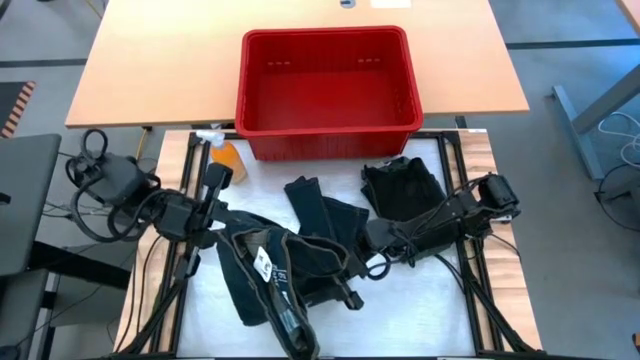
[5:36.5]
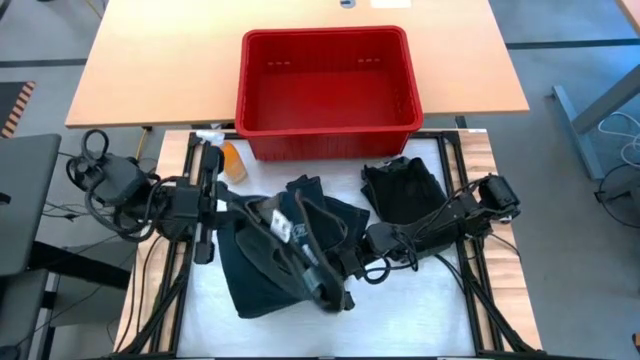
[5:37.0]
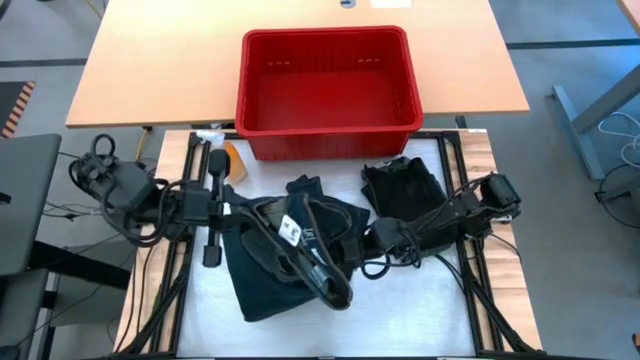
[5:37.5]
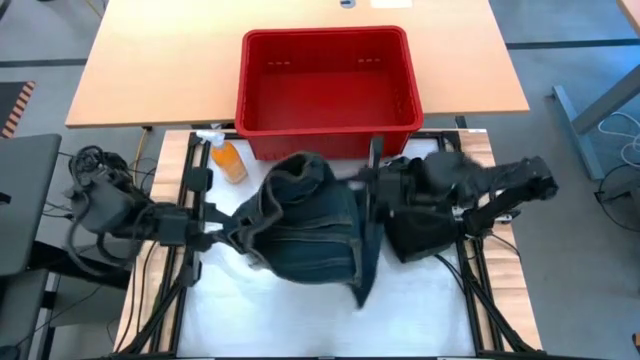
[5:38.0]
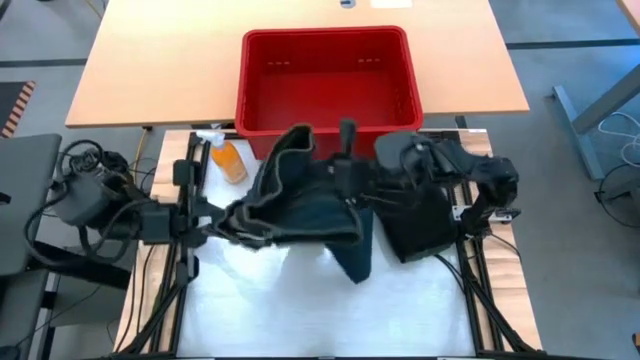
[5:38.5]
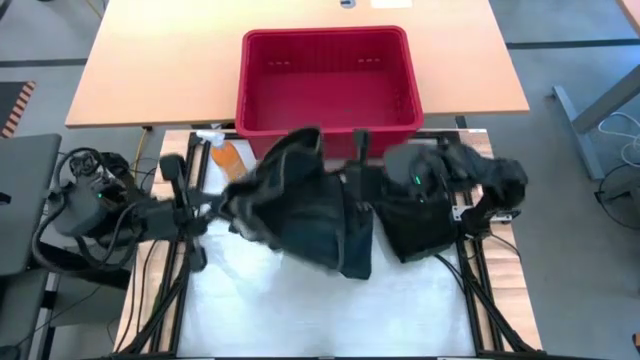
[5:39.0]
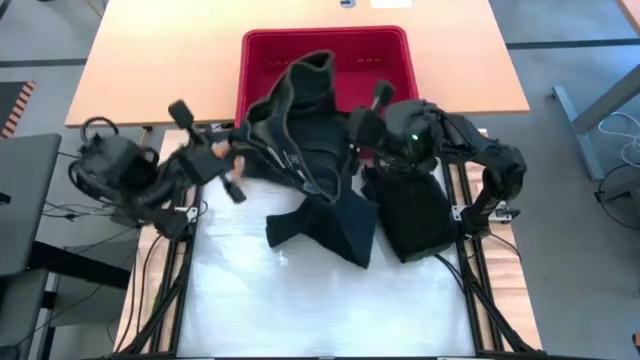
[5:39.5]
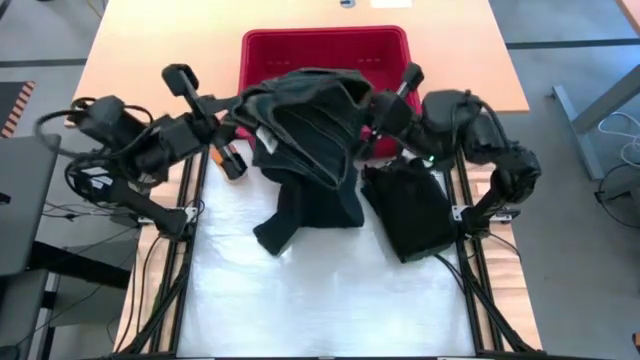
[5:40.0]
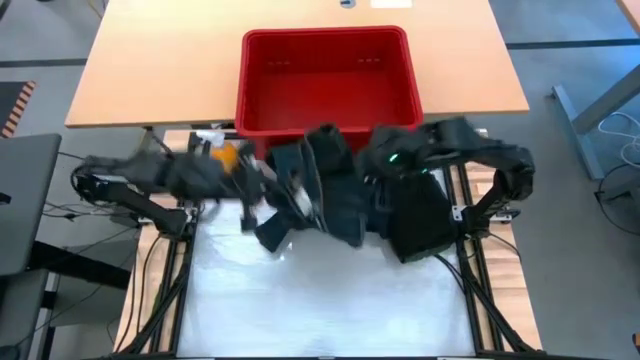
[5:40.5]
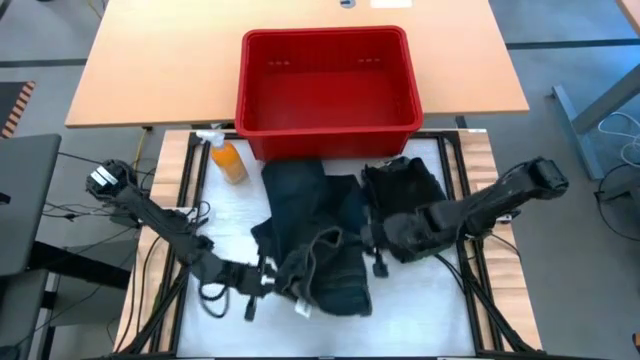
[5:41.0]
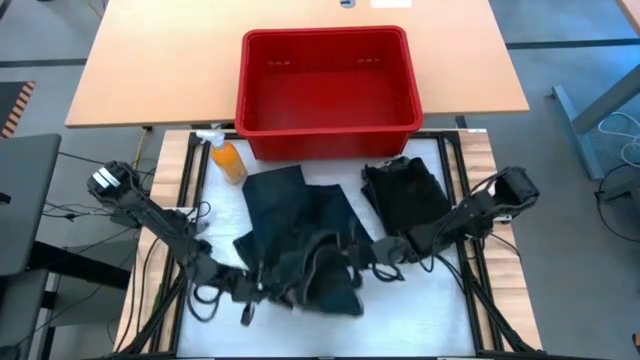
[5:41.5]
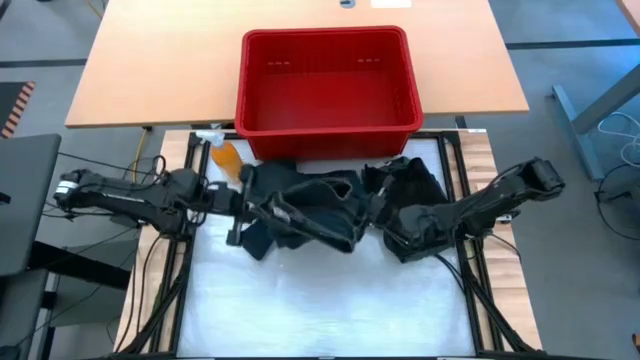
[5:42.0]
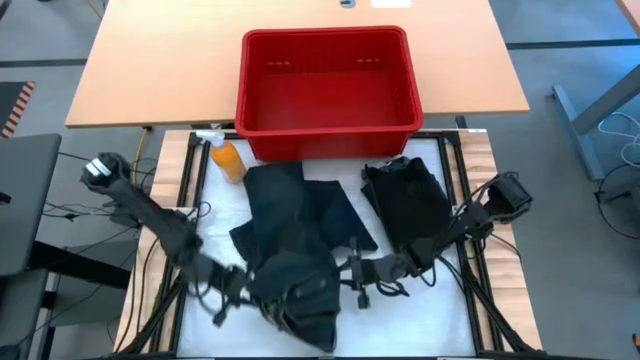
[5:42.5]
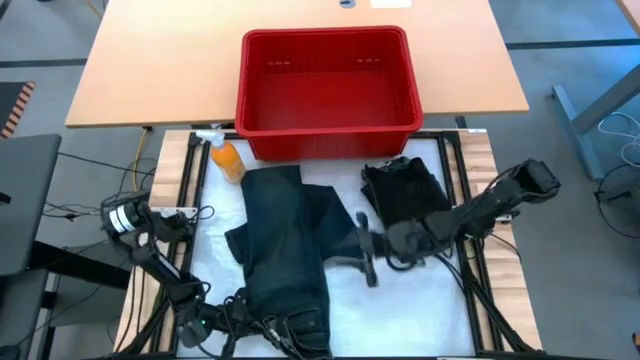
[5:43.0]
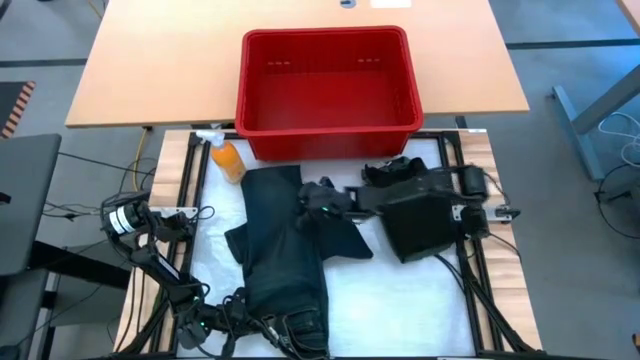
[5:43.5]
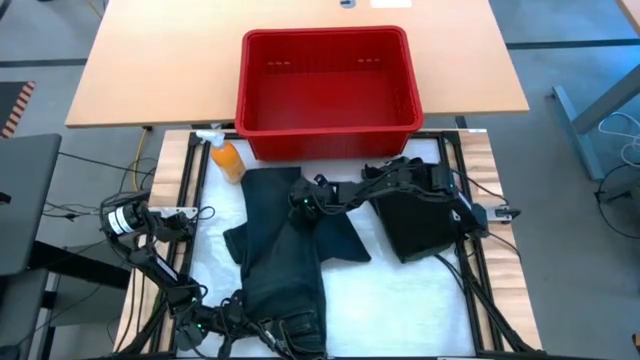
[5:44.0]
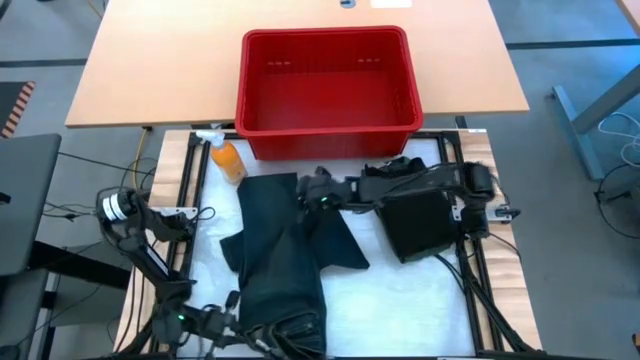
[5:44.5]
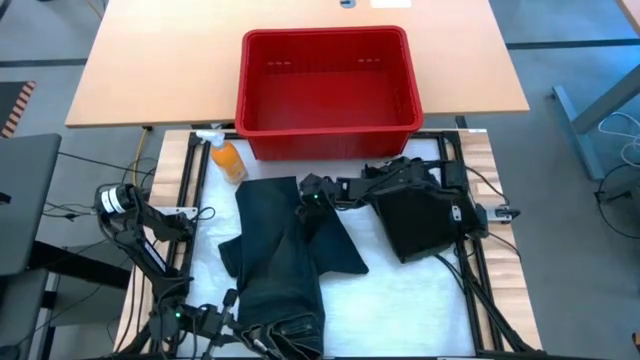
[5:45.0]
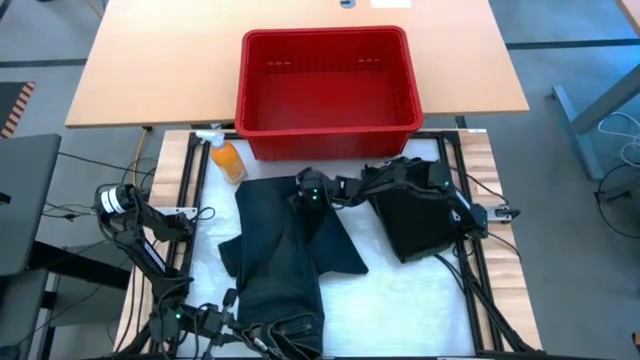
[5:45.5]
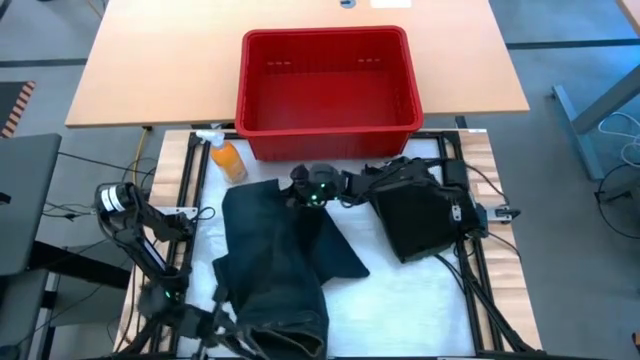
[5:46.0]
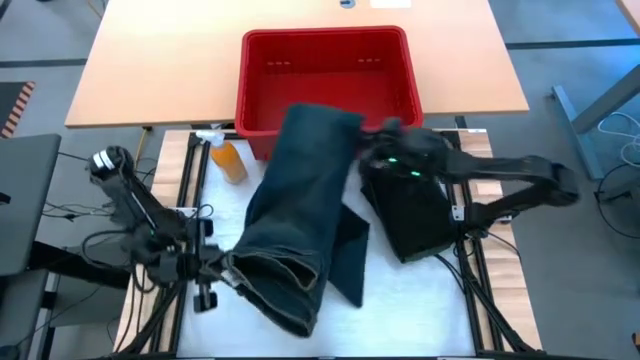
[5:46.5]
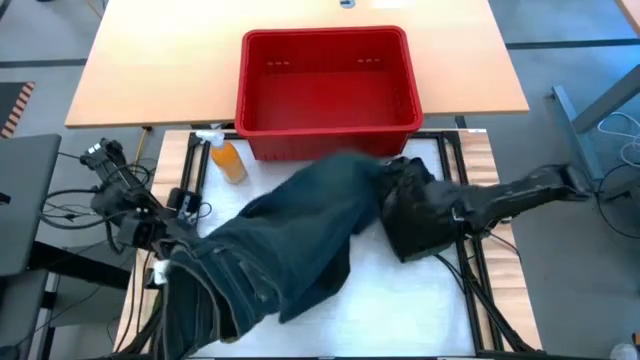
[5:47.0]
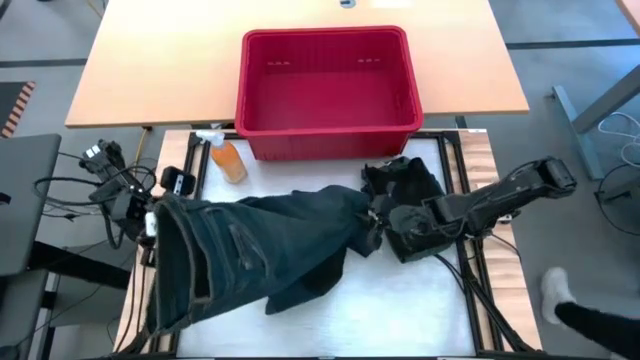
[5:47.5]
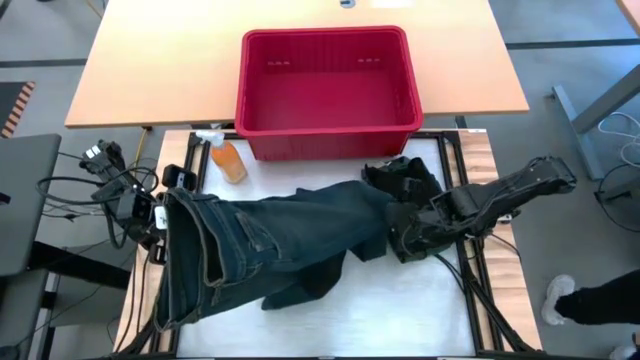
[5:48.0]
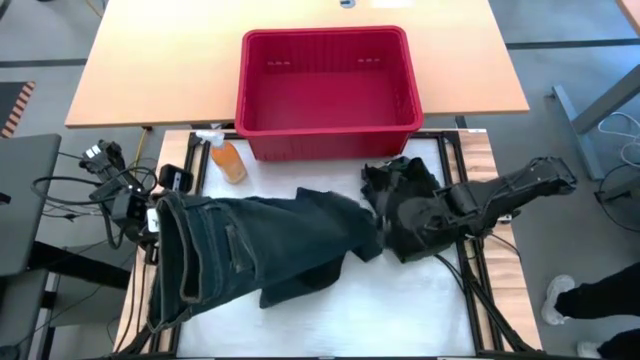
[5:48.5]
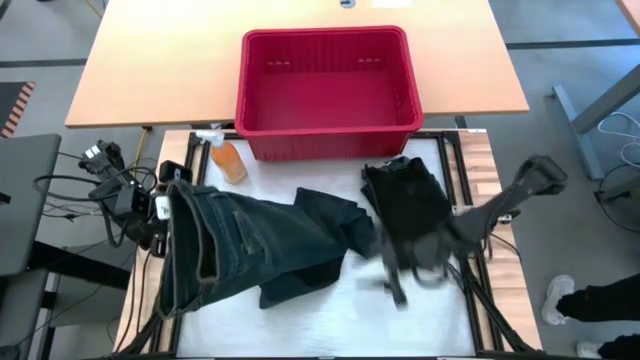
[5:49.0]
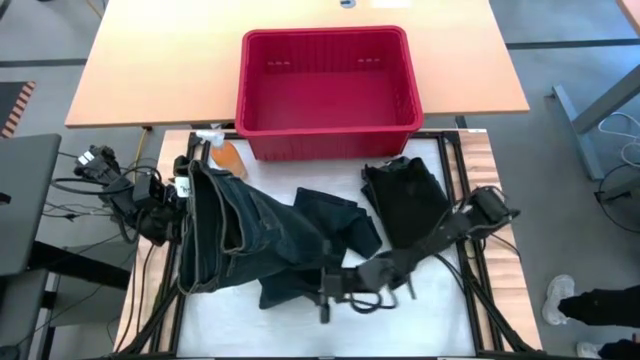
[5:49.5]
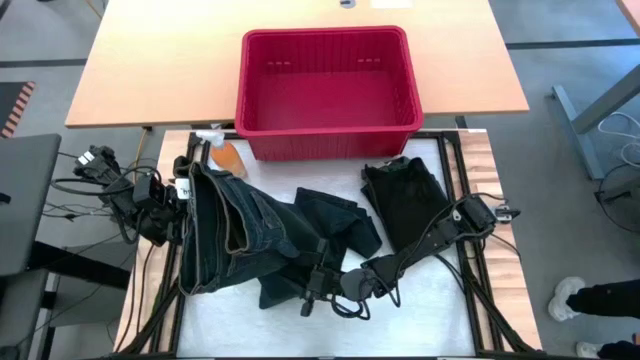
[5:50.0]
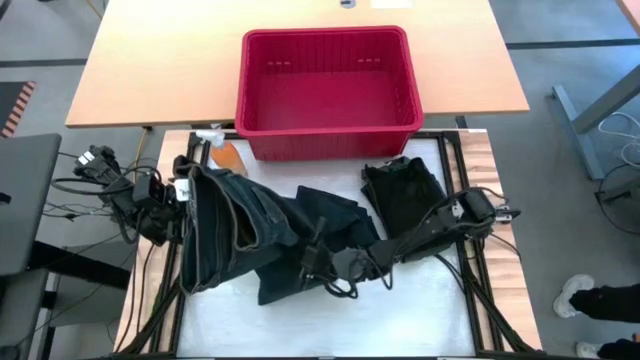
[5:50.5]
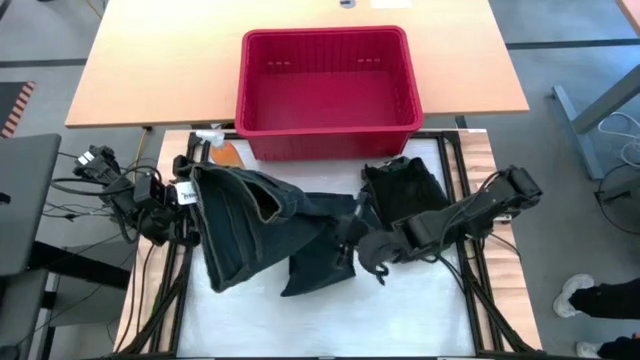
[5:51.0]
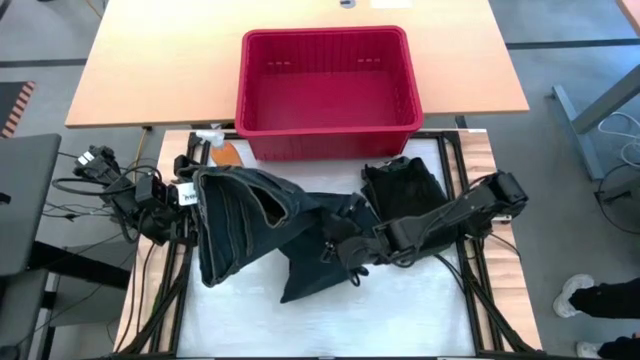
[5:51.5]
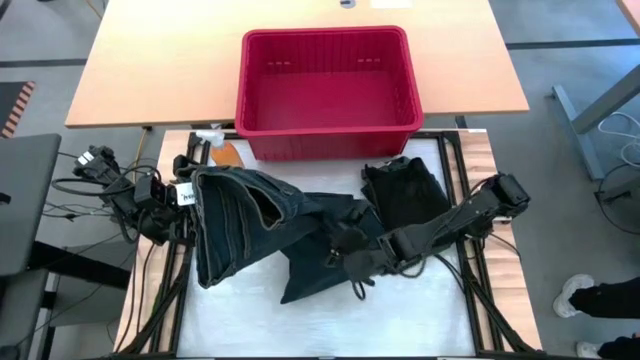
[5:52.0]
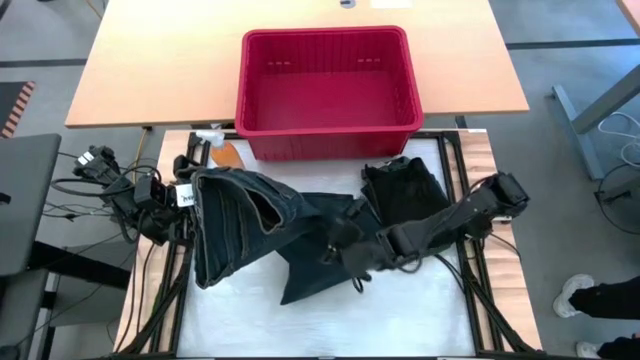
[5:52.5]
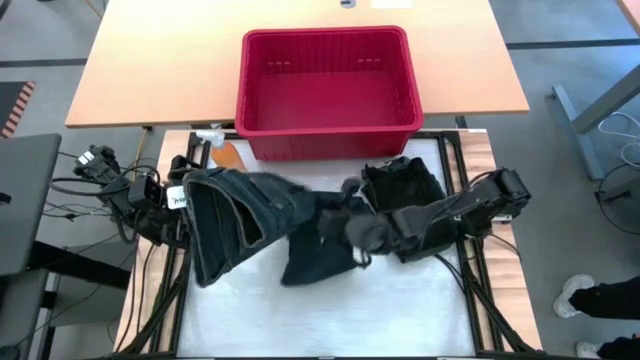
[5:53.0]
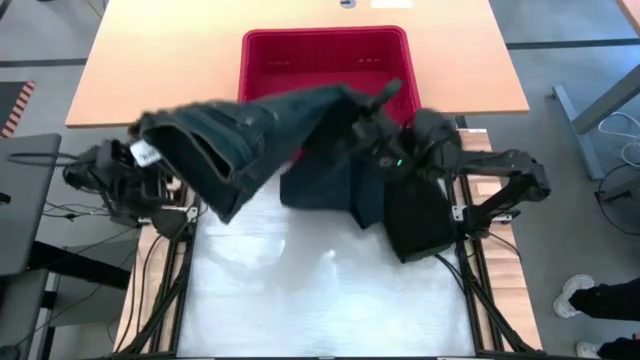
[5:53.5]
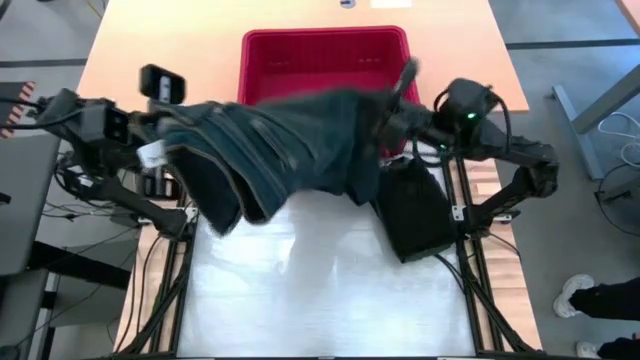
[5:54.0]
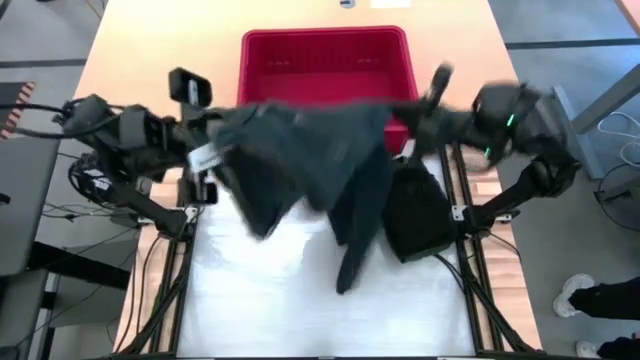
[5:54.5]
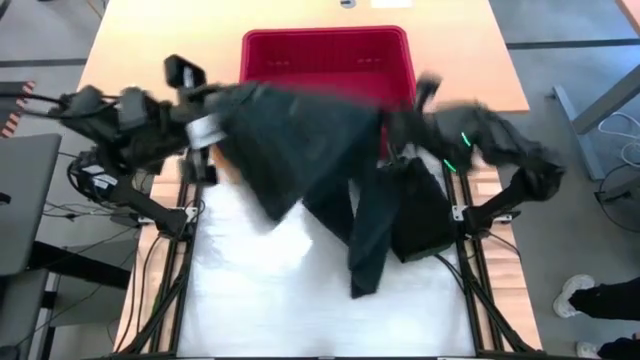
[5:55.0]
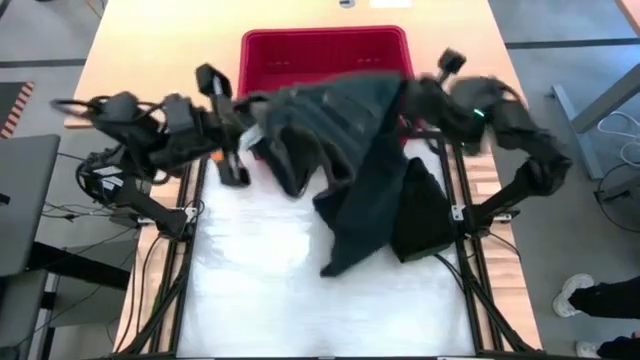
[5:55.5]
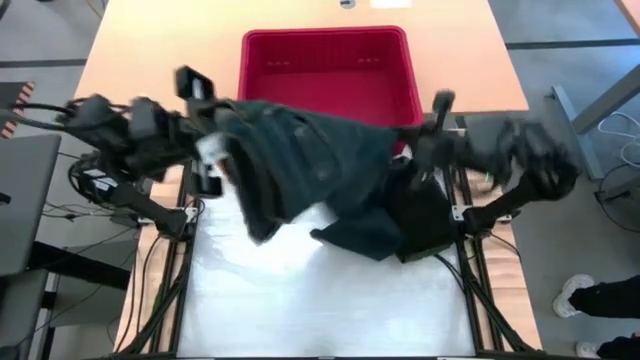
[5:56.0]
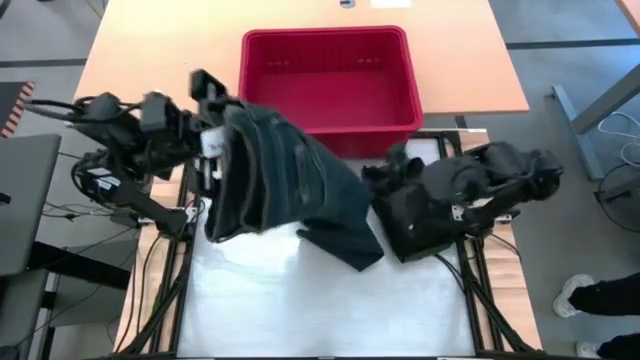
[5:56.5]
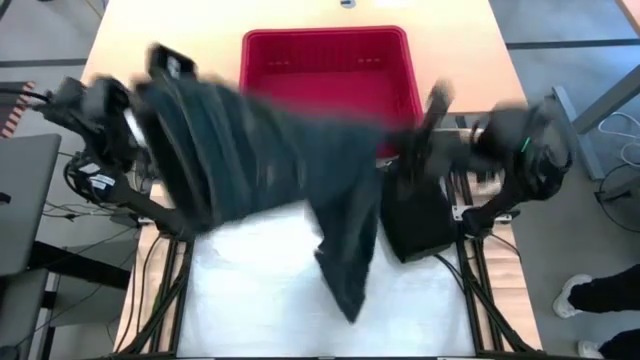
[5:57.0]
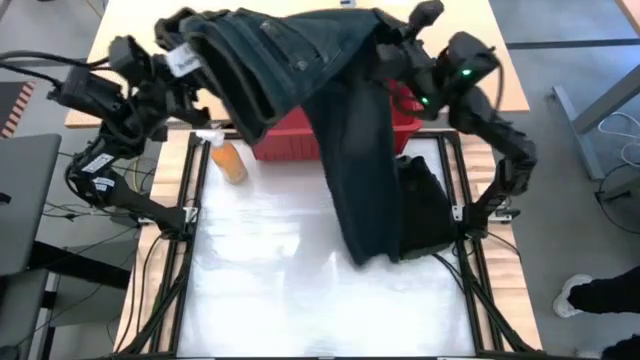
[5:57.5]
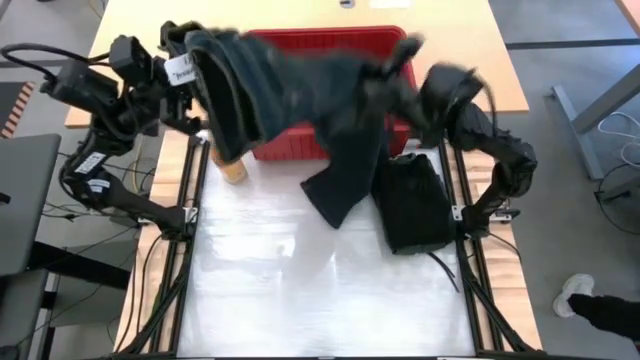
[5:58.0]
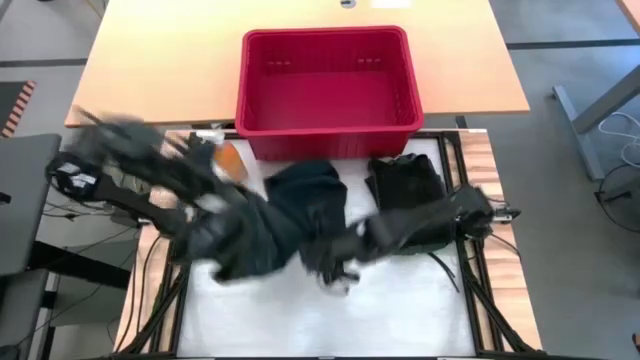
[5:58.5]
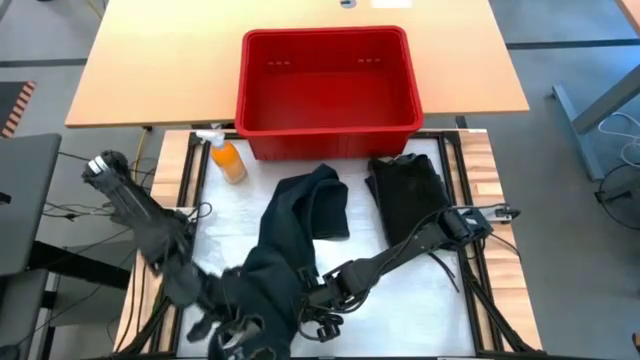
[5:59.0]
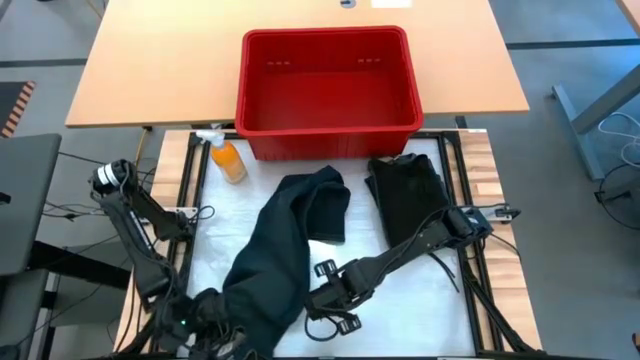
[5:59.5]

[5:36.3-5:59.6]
Task: Fold laundry
Fold the dark blue jeans
